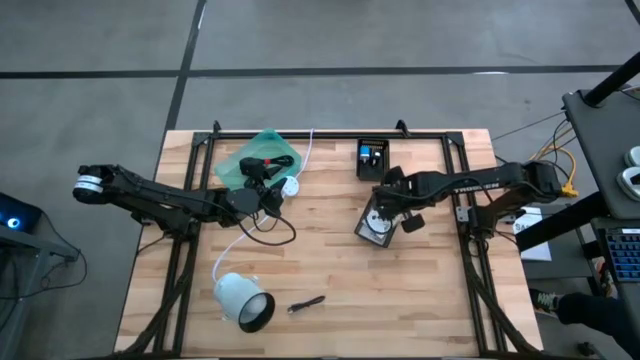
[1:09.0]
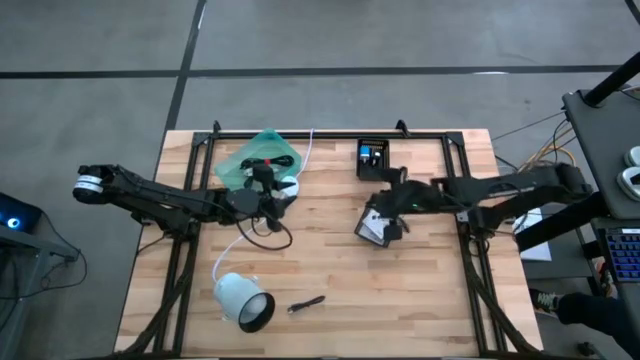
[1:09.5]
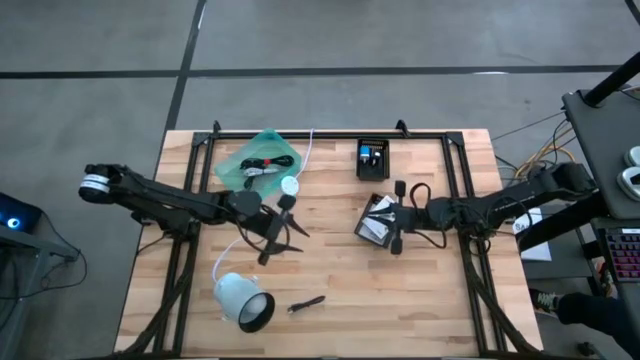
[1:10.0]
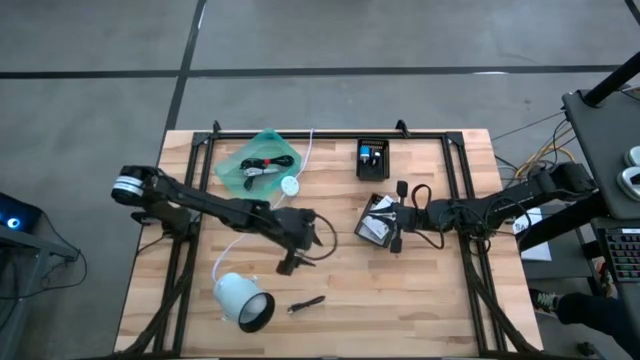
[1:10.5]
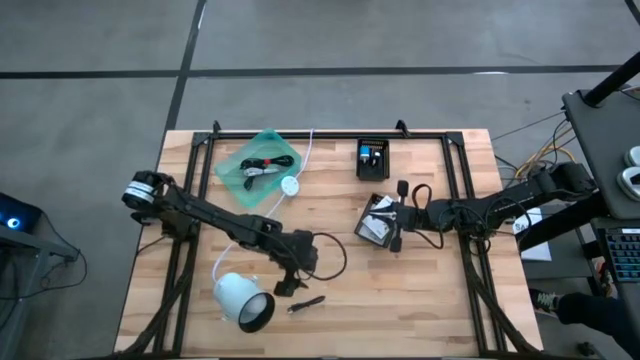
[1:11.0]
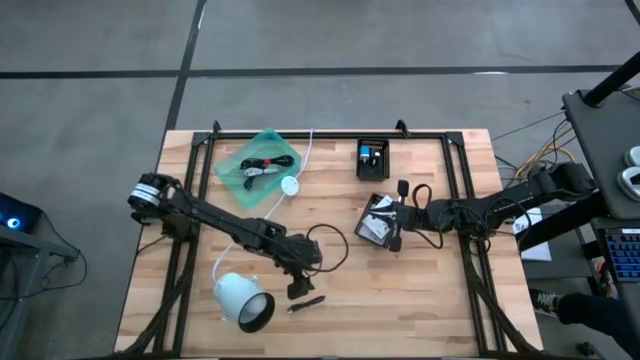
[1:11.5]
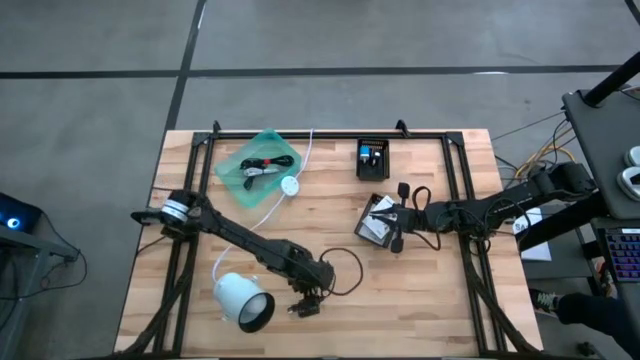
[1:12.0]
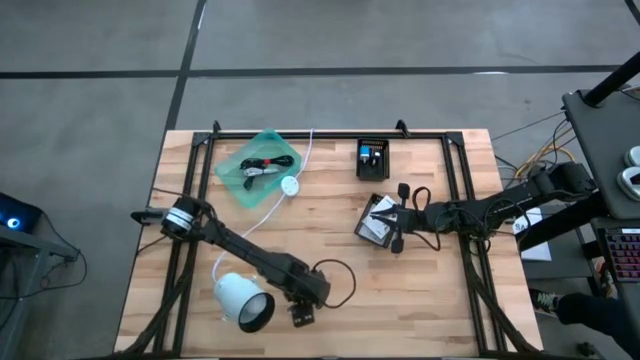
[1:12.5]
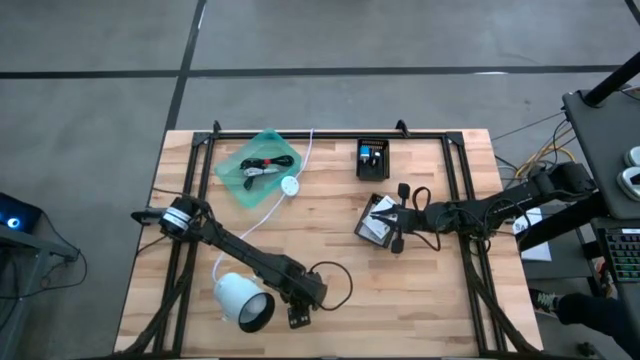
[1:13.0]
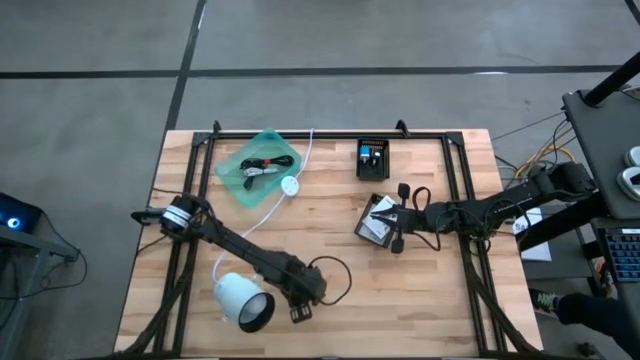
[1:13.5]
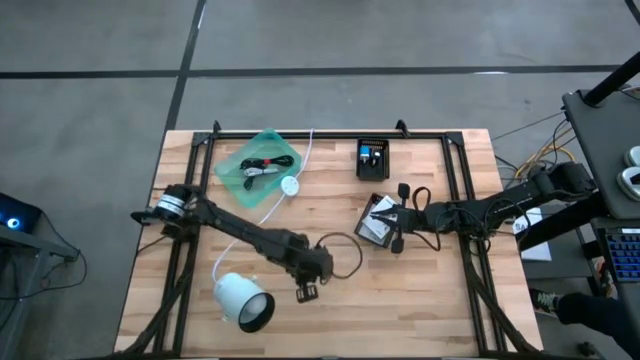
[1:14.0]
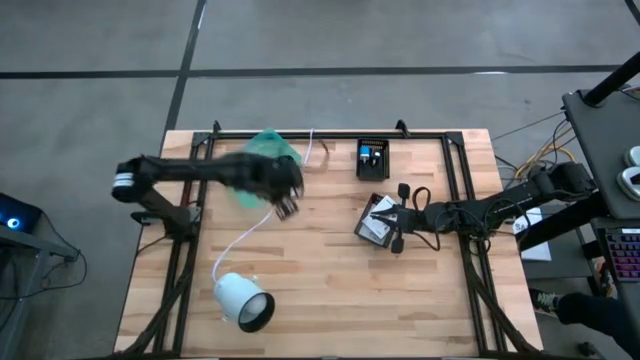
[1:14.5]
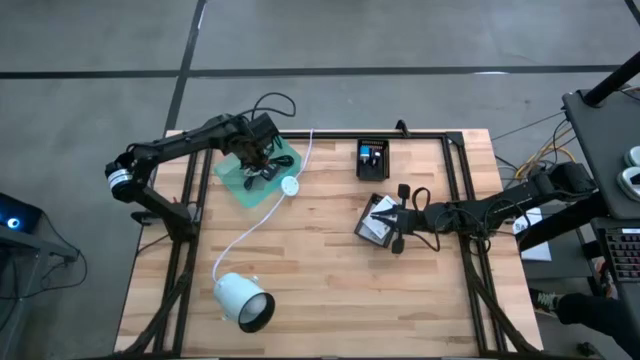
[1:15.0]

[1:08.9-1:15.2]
Task: Pick and place items into bin
Put the black charger cable into the green bin

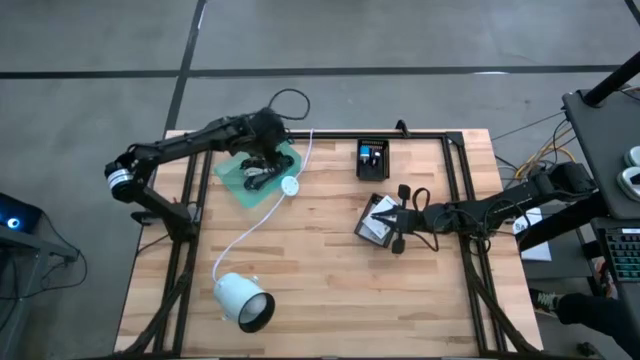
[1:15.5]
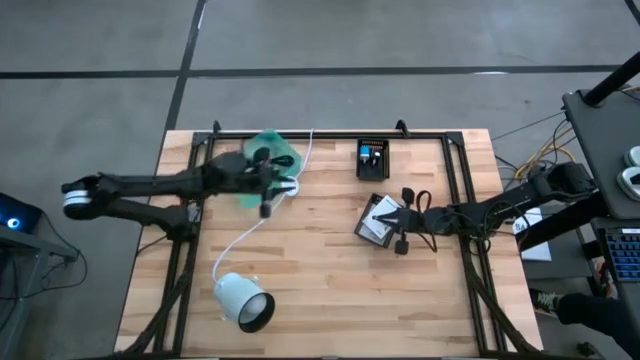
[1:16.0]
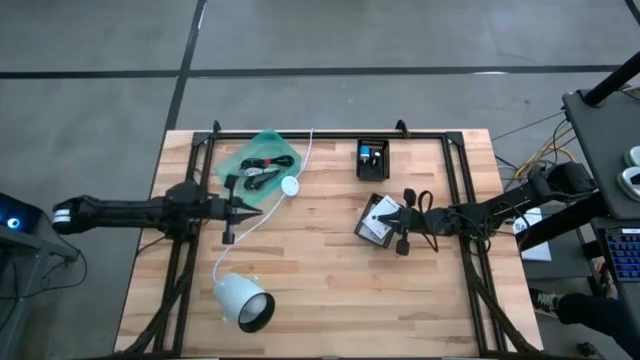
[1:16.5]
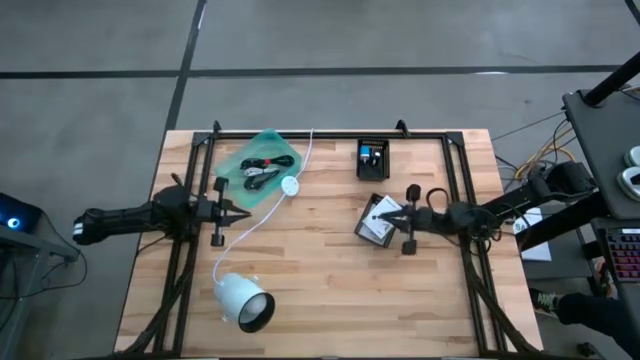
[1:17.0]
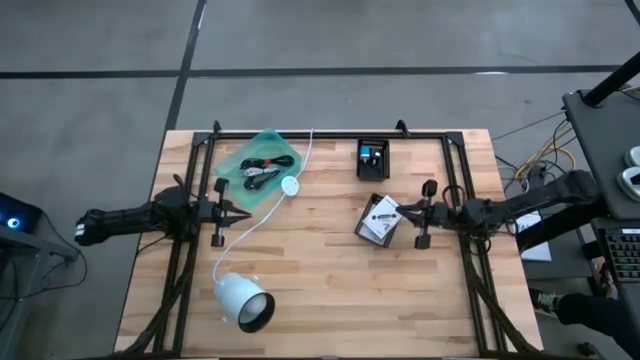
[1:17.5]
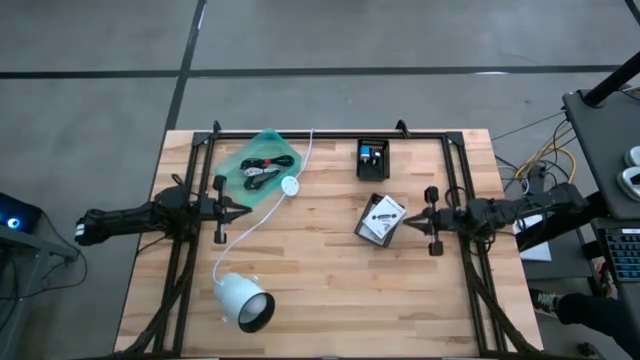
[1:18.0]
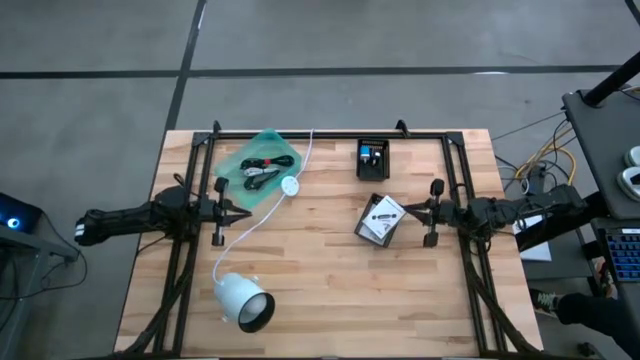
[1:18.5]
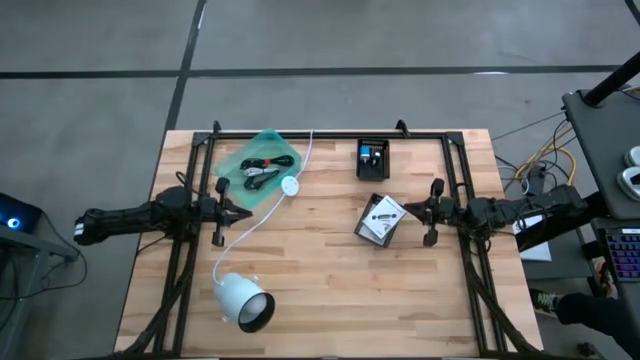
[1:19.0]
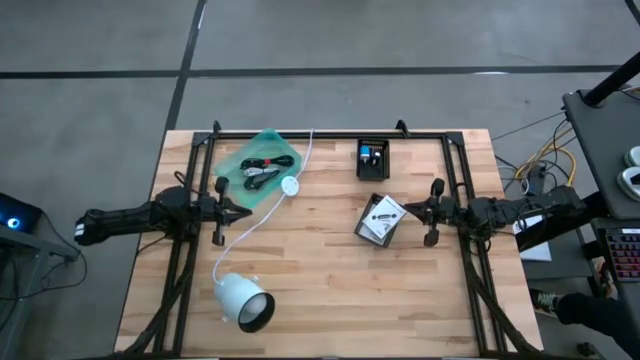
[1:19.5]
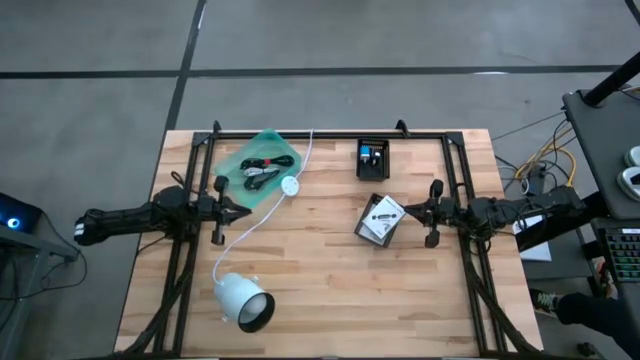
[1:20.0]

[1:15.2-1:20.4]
Return to Home Position

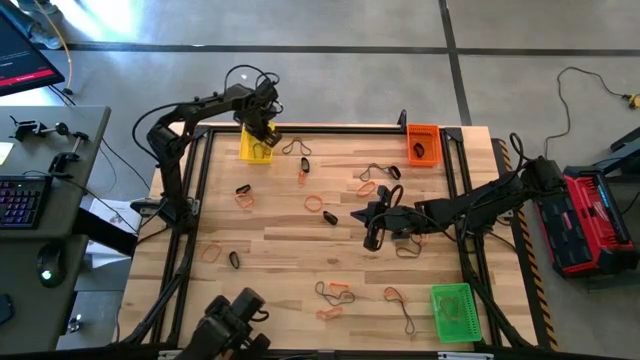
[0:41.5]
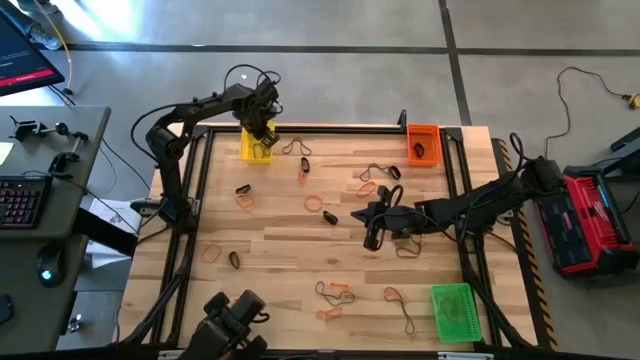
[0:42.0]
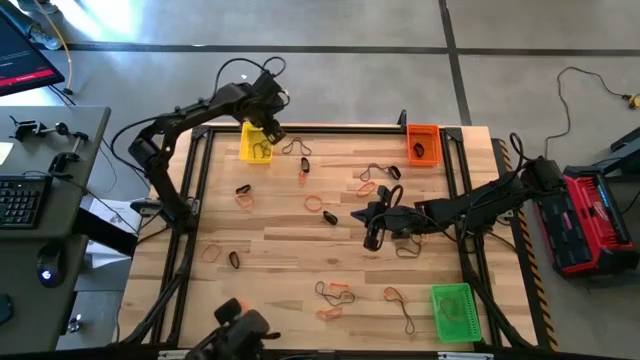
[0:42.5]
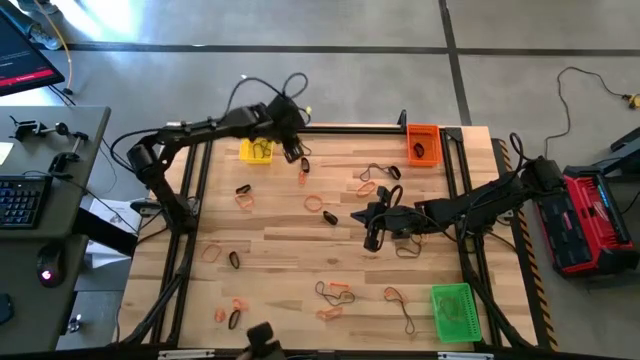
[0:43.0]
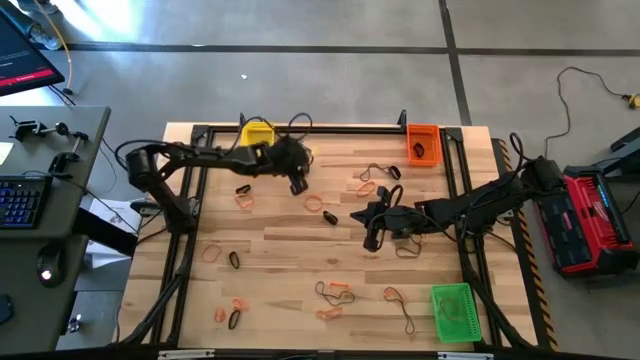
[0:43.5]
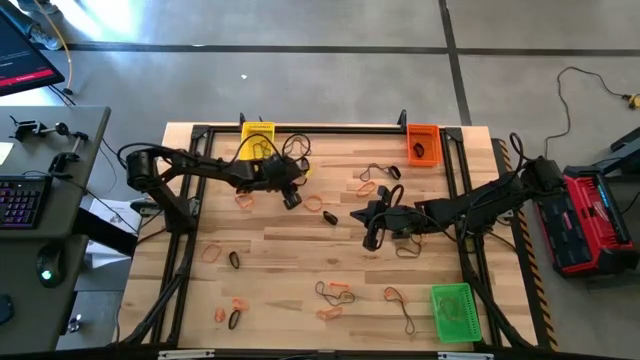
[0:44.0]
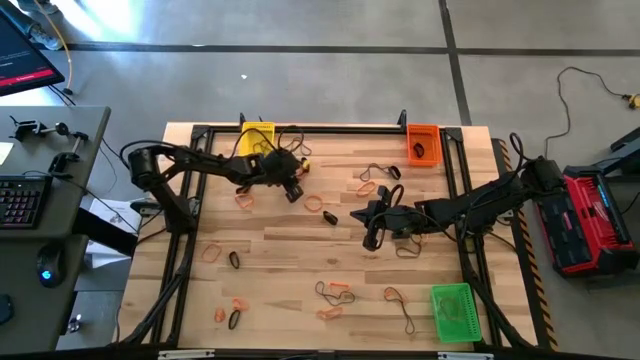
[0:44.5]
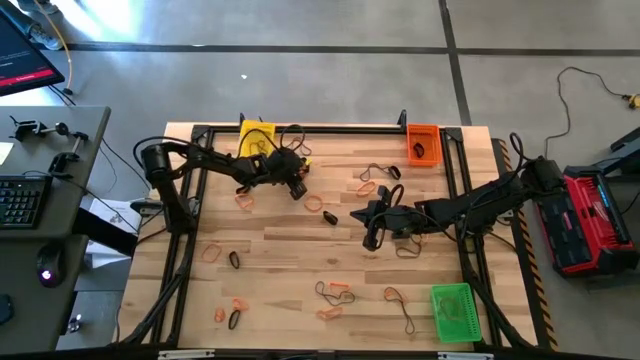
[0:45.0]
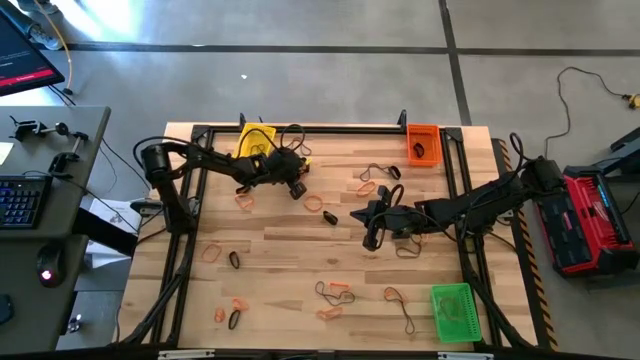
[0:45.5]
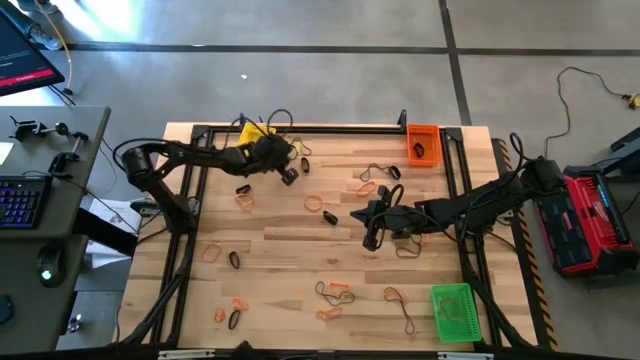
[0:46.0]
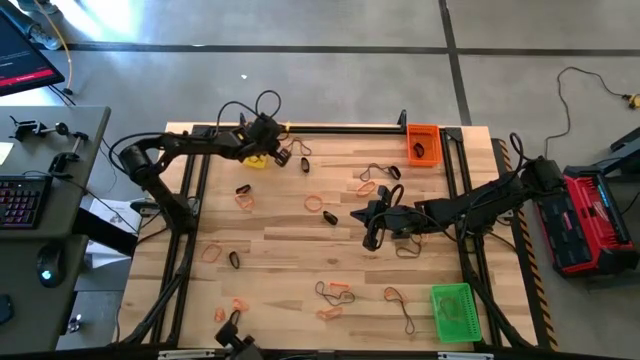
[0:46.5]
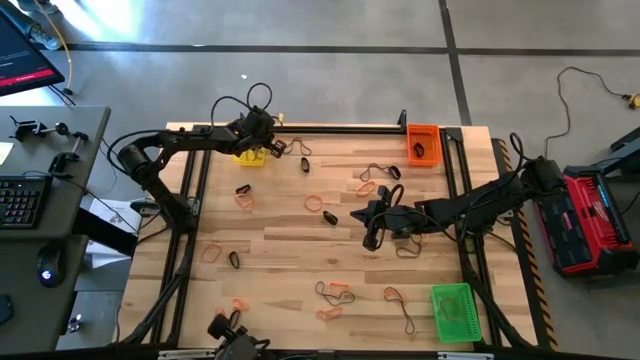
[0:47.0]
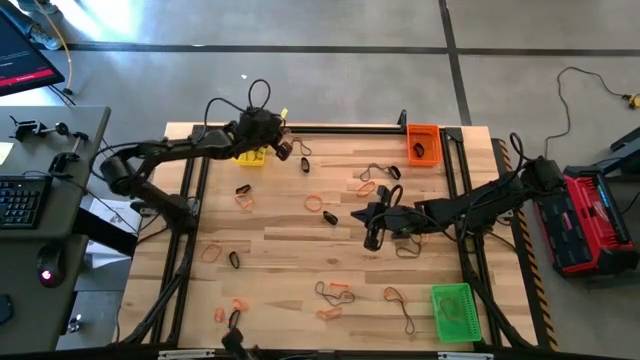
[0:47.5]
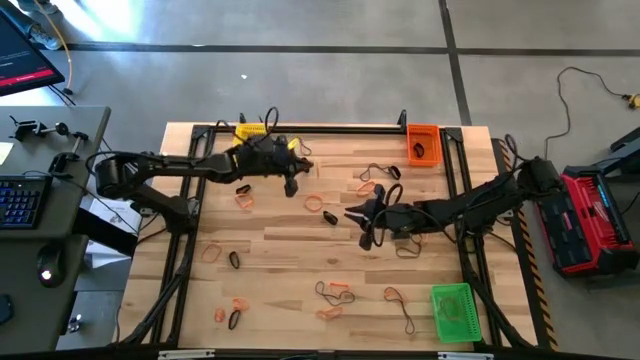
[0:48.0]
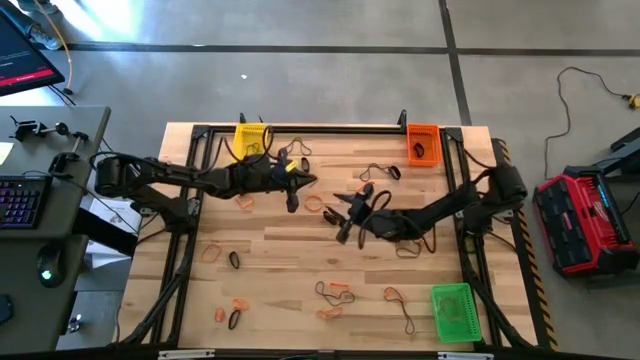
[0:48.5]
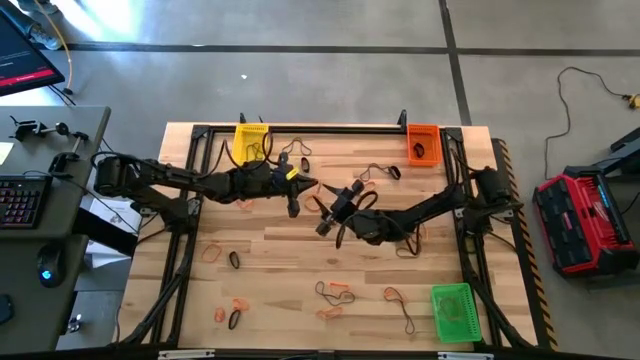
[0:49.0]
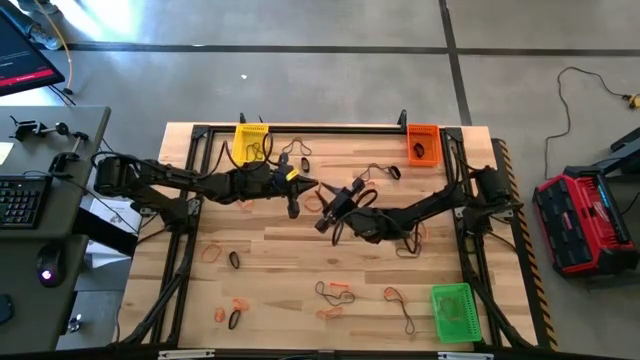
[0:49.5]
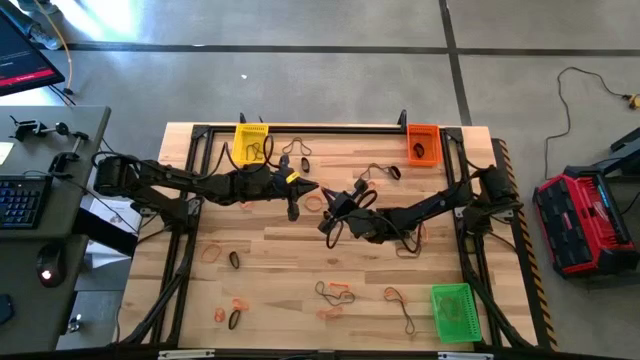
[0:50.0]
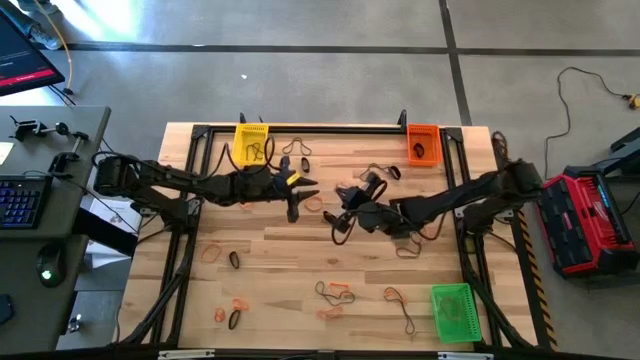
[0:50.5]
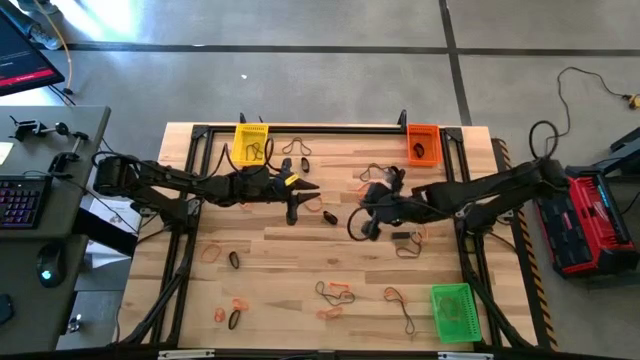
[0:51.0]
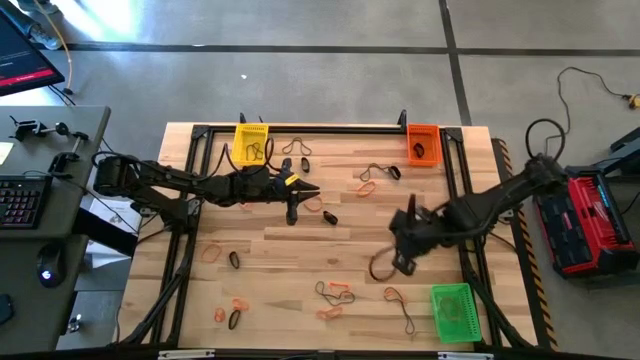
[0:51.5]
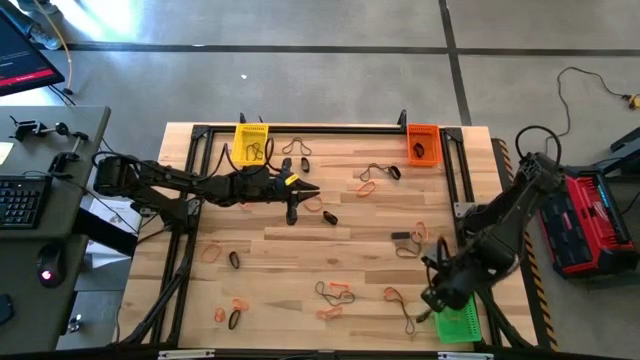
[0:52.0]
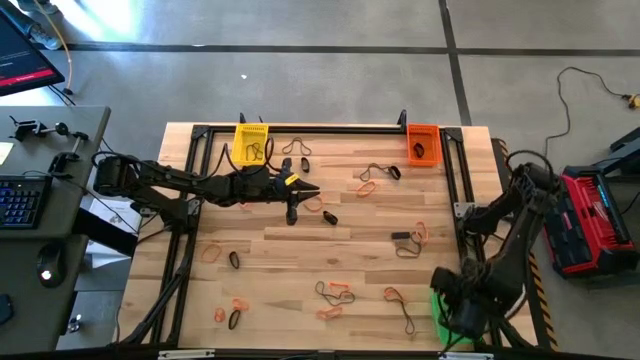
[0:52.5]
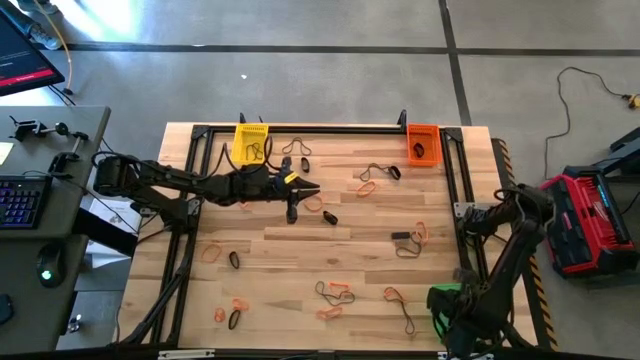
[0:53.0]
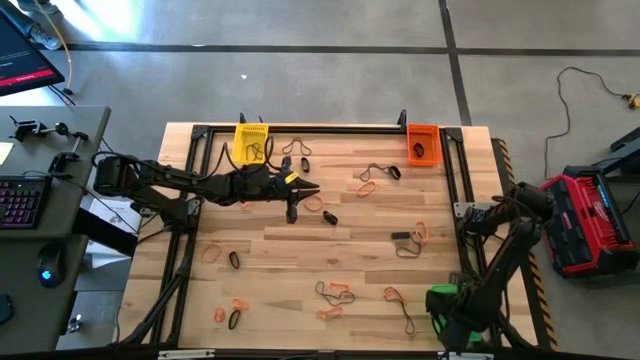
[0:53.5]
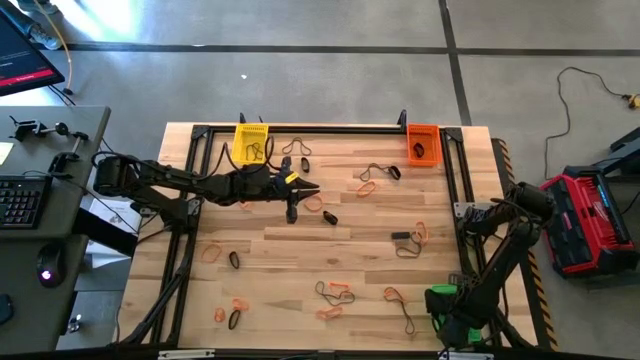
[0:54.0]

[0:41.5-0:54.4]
Task: Sort rubber bands into baskets
Put the orange rubber band into the green bin
